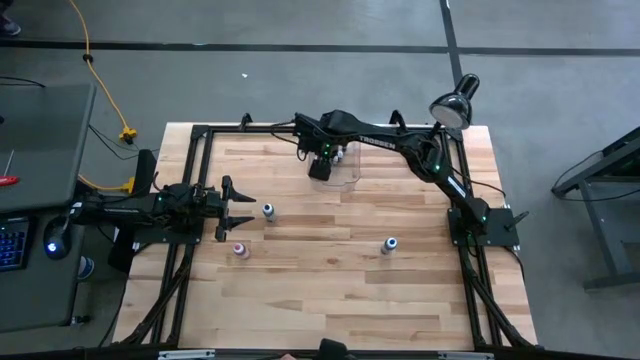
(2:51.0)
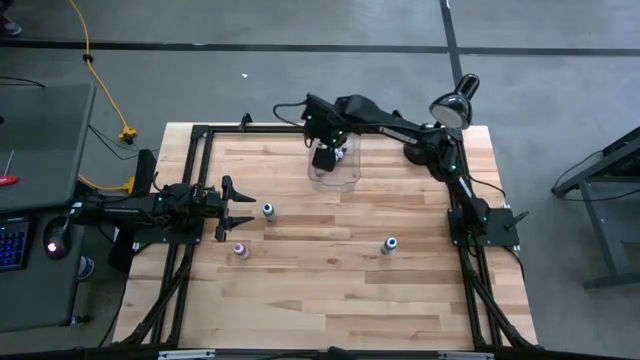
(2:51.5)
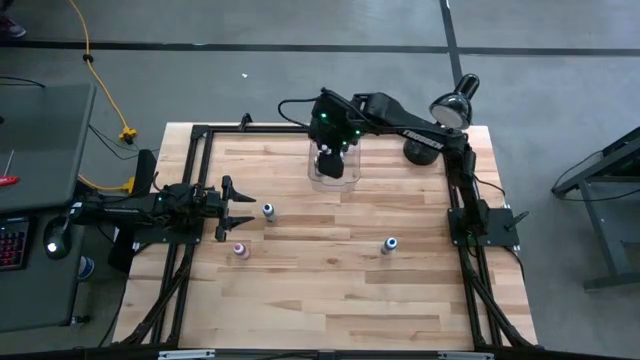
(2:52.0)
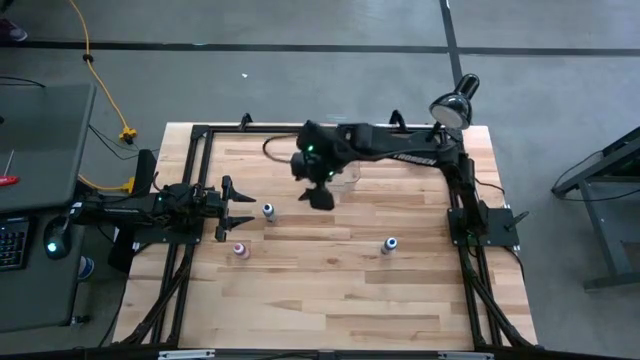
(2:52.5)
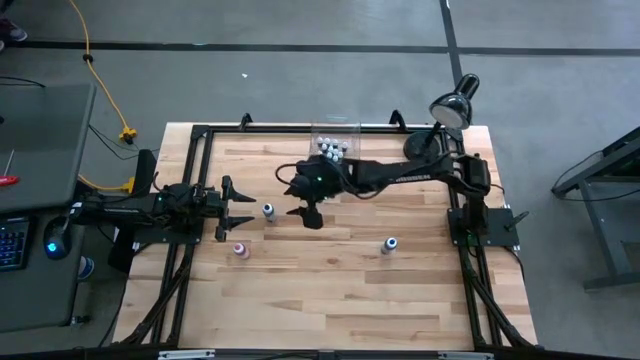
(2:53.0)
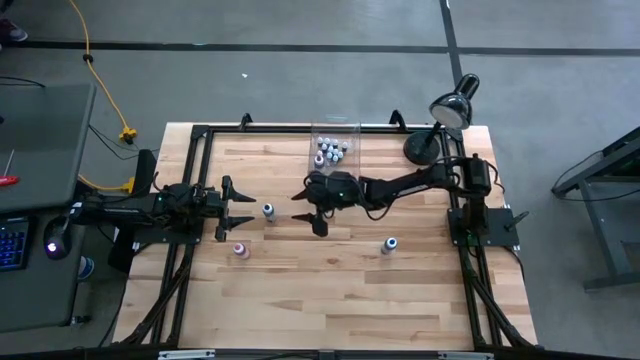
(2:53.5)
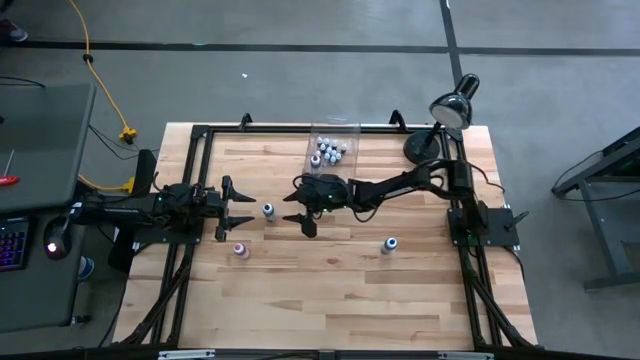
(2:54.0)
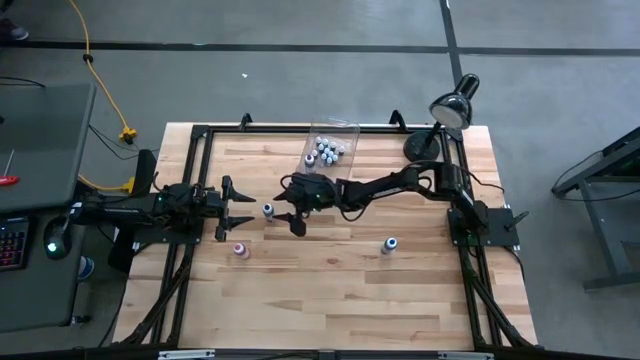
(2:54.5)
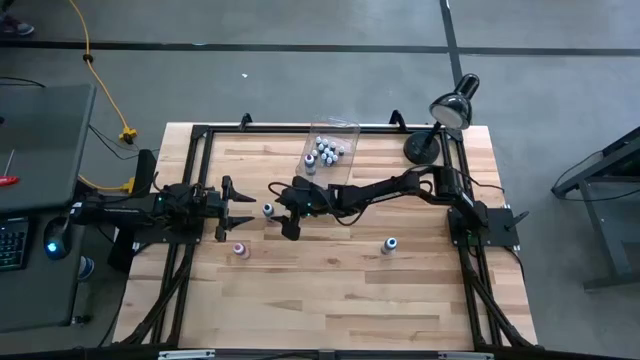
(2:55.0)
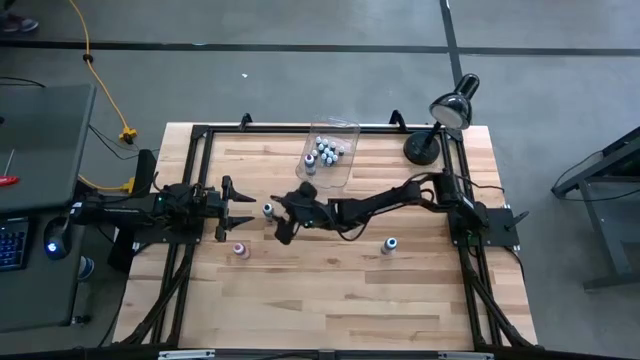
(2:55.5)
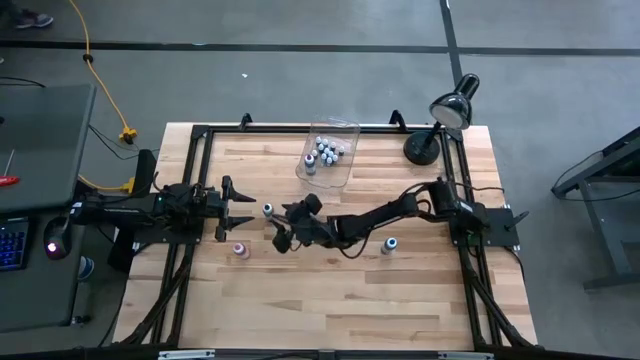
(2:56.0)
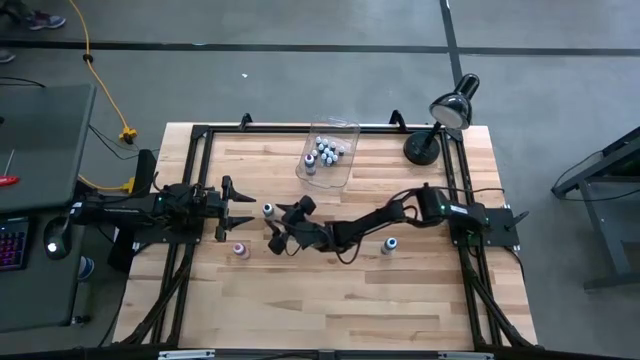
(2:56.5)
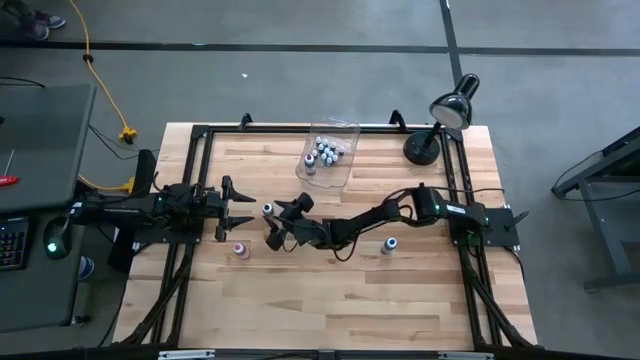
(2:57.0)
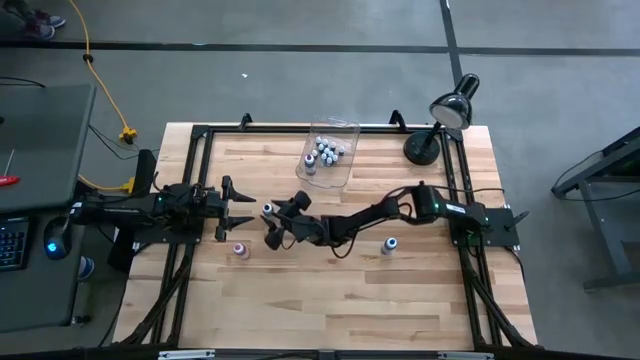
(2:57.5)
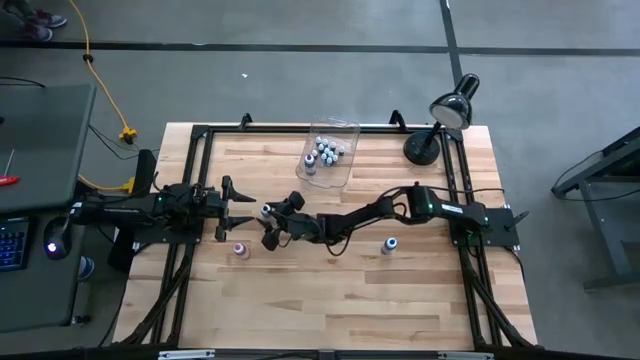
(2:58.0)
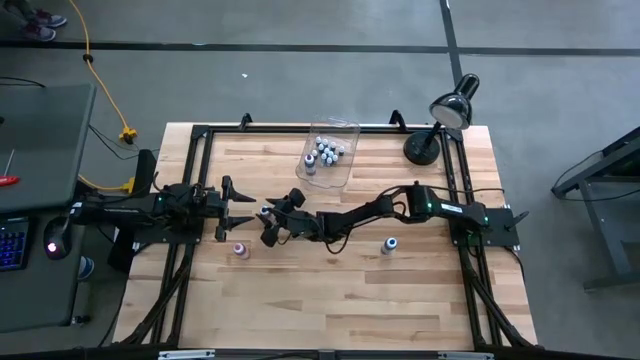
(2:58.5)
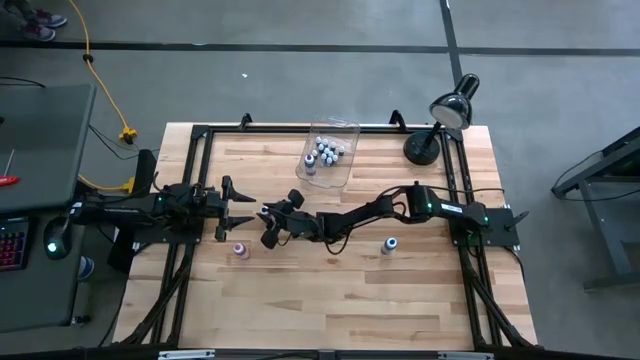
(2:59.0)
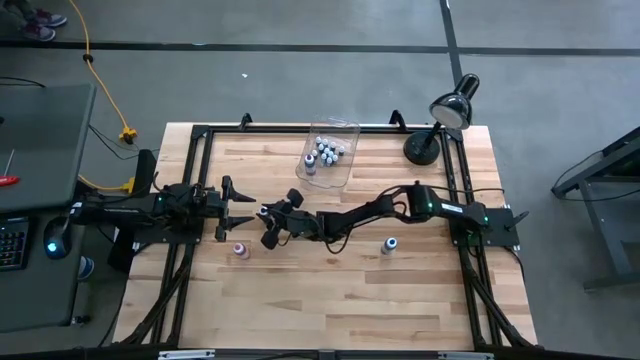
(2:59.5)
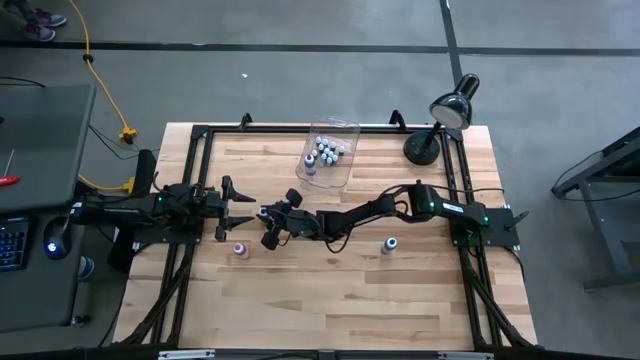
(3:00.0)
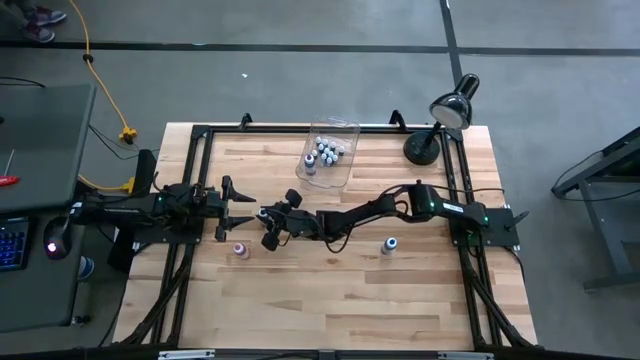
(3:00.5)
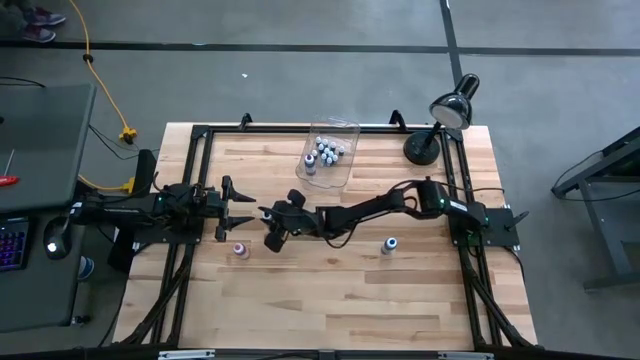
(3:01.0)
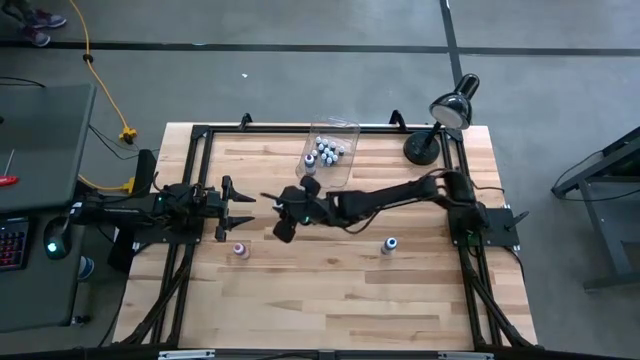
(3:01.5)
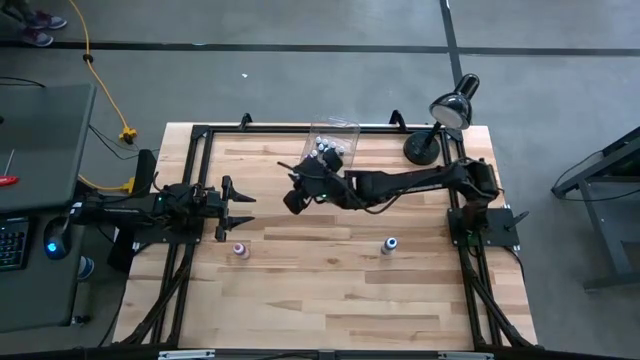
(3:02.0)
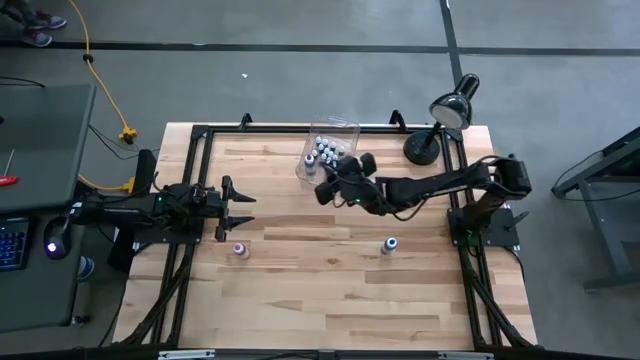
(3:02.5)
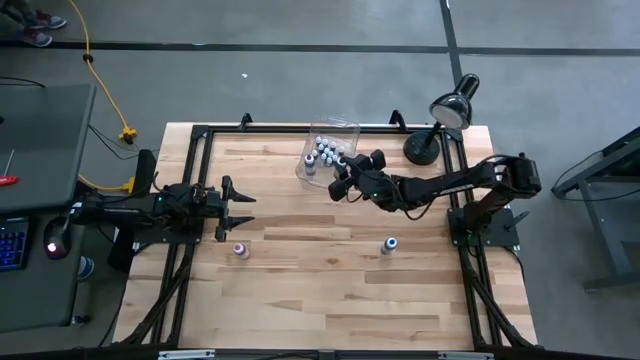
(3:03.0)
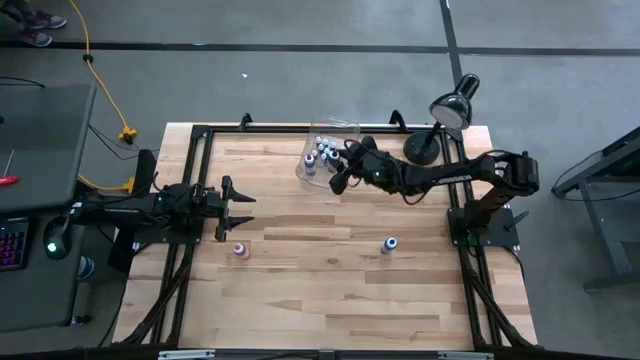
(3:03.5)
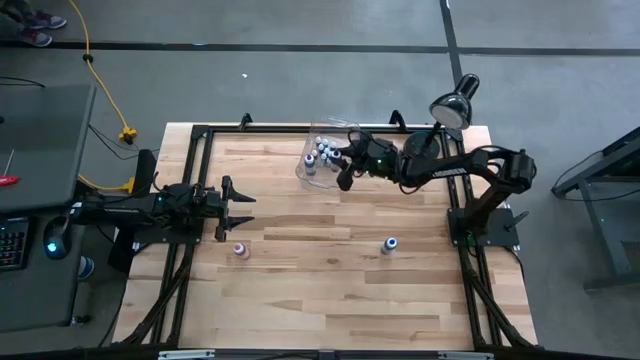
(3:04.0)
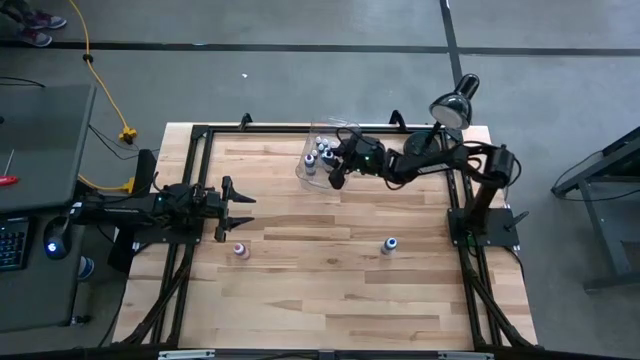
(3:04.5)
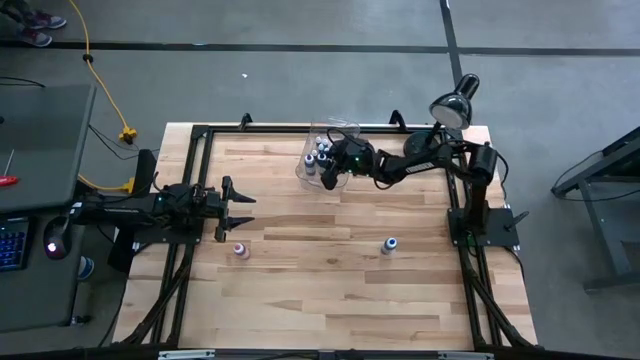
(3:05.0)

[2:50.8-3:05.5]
Task: Pick & Place food coloring
Put the big black food coloring bottle into the transparent bin

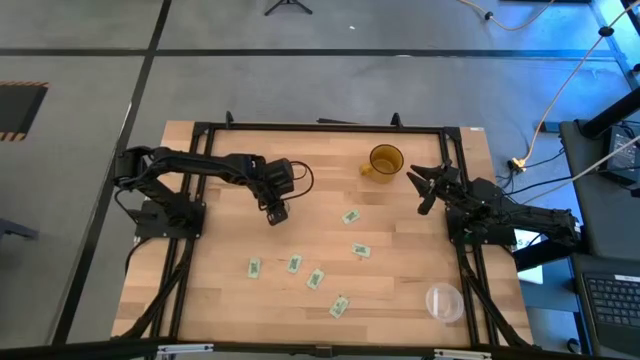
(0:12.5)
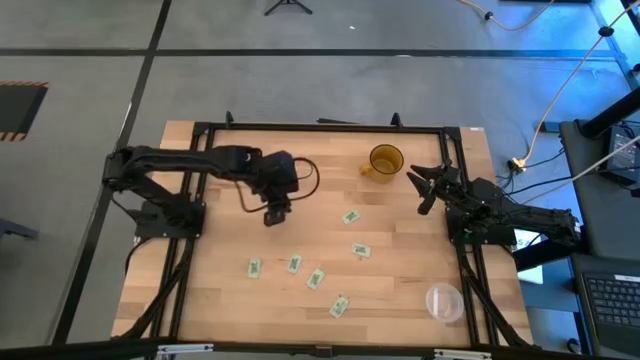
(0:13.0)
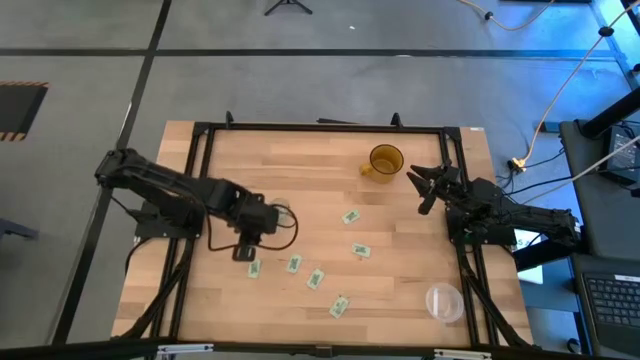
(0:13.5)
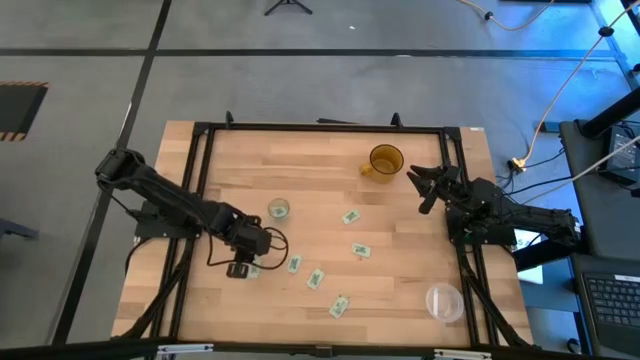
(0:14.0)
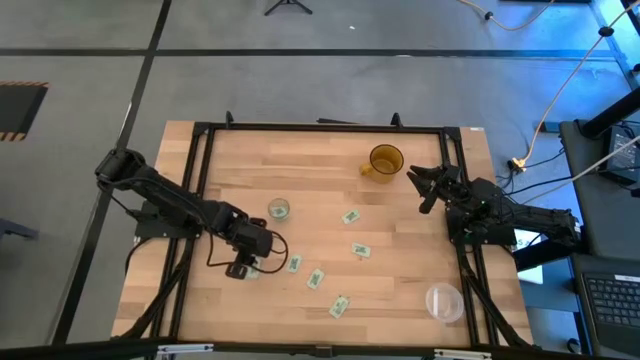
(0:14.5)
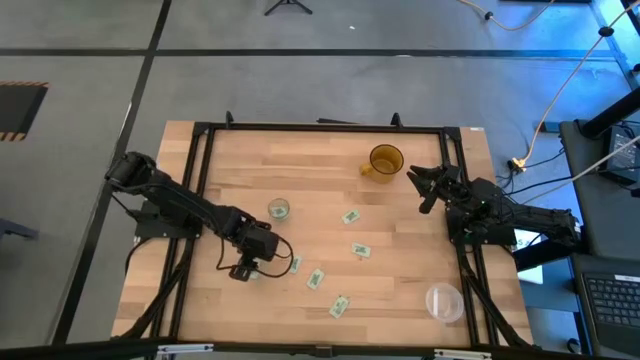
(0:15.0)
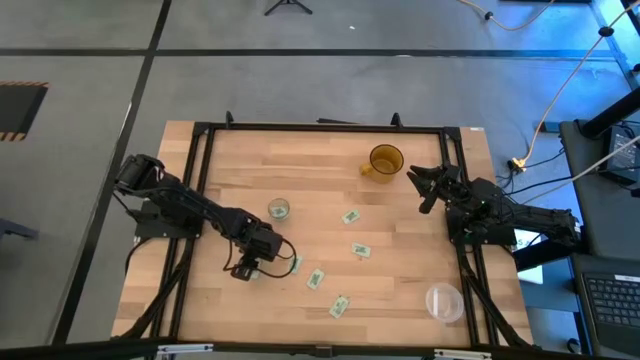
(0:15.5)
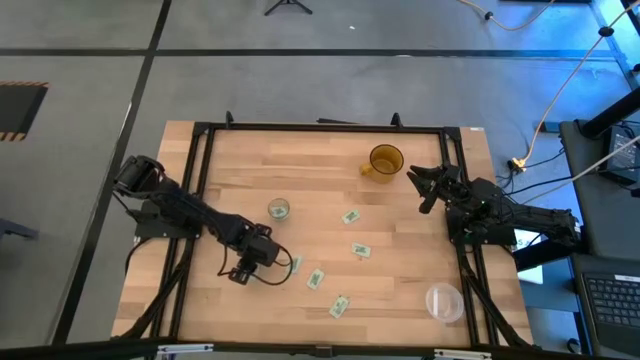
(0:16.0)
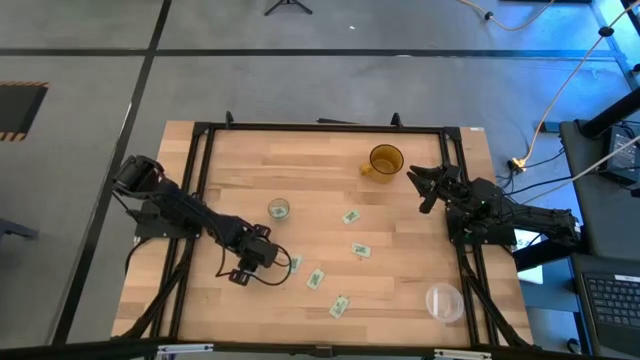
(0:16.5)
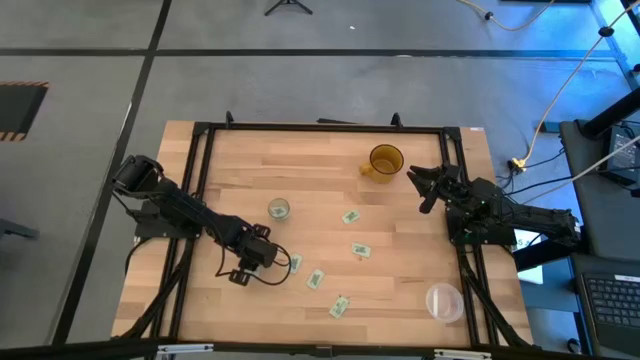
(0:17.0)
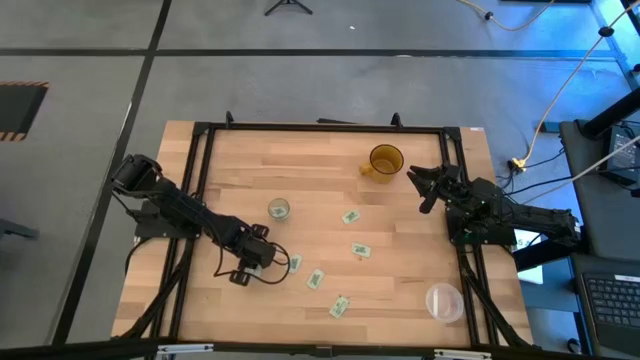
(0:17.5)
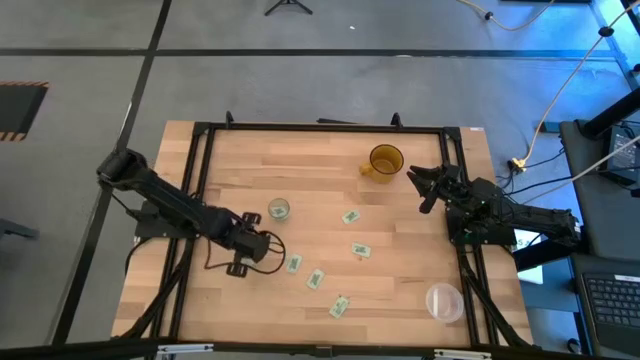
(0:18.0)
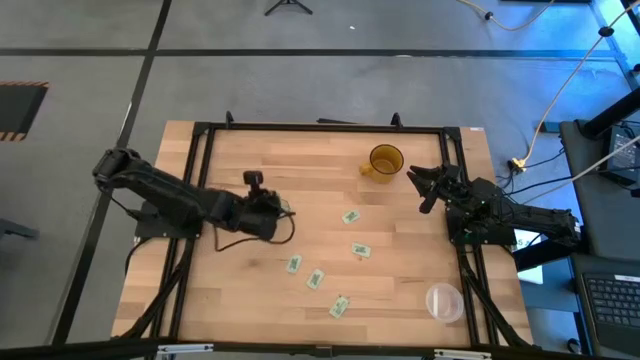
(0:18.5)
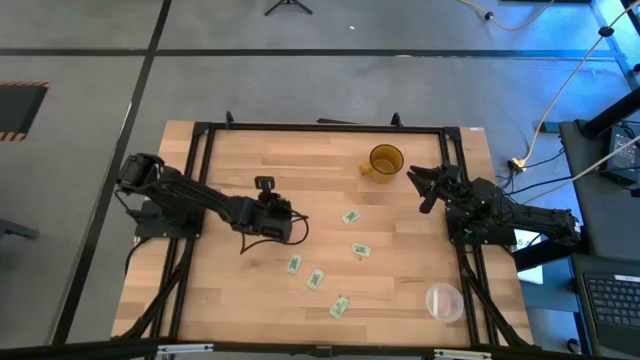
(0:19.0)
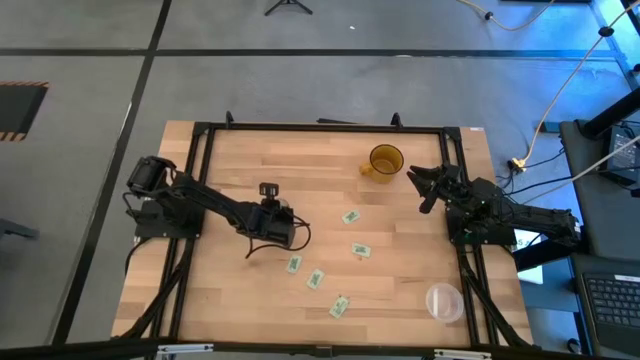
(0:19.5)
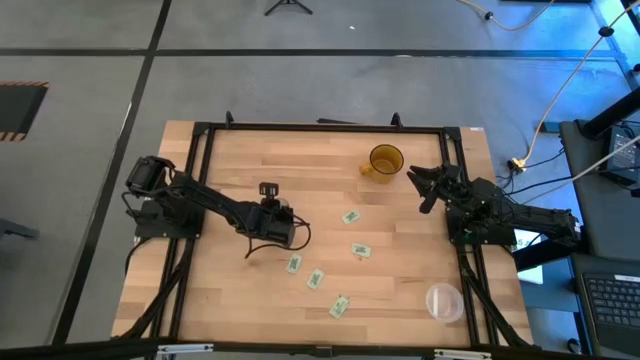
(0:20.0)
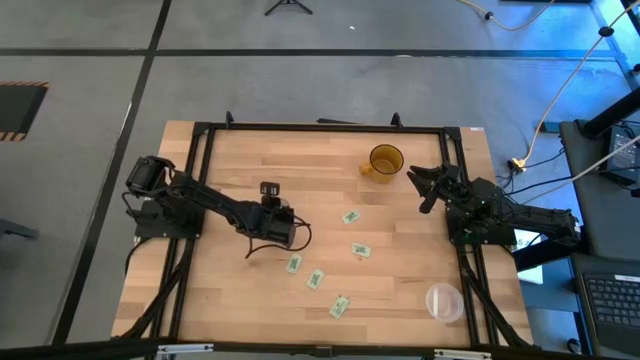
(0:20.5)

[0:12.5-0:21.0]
Task: Pick and place Stevia / Truvia into bins
Put the stevia packet into the transparent container
